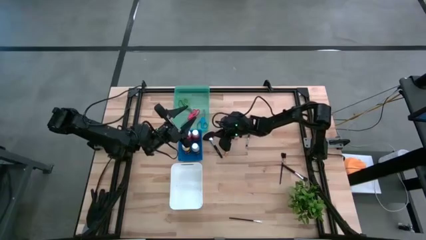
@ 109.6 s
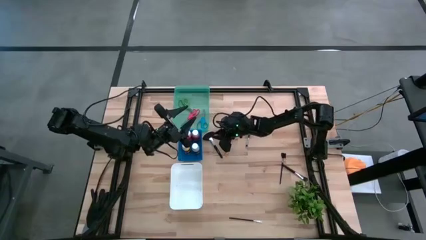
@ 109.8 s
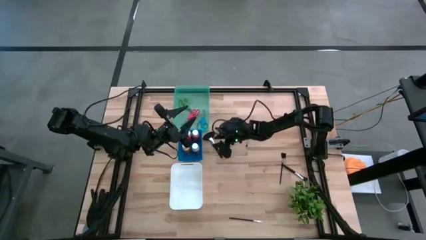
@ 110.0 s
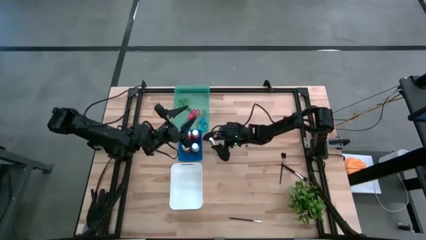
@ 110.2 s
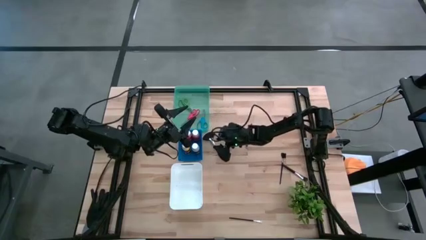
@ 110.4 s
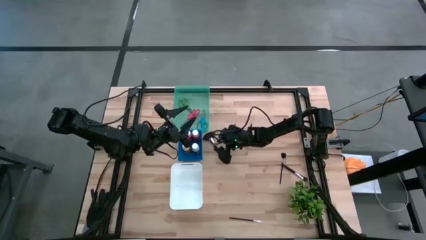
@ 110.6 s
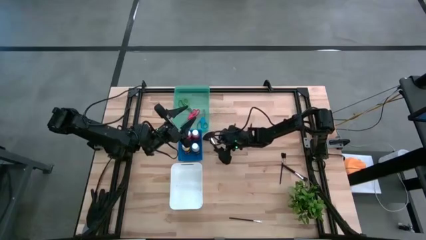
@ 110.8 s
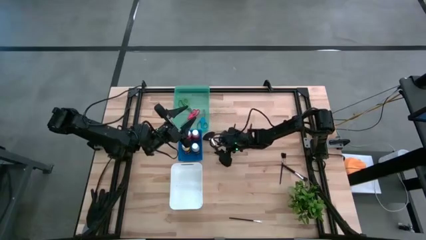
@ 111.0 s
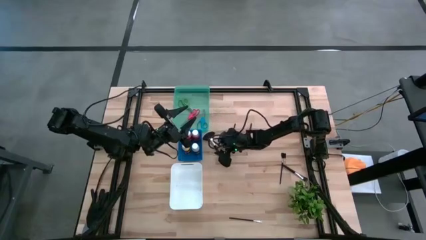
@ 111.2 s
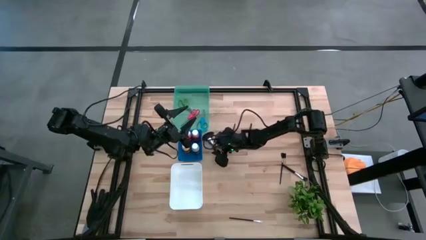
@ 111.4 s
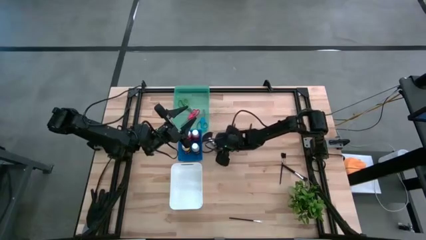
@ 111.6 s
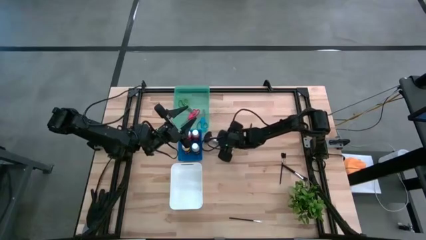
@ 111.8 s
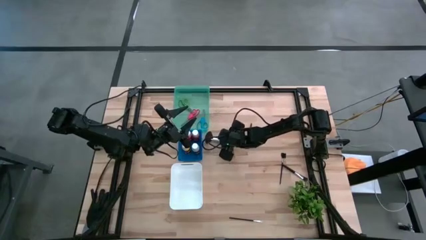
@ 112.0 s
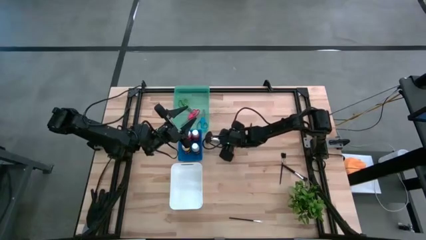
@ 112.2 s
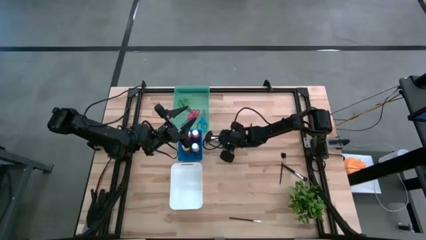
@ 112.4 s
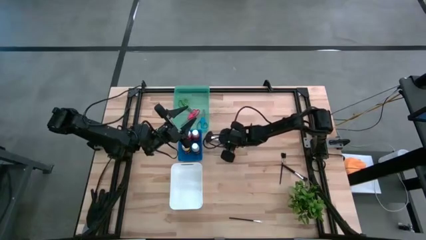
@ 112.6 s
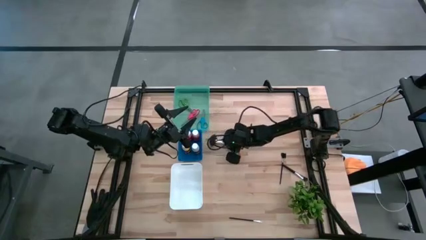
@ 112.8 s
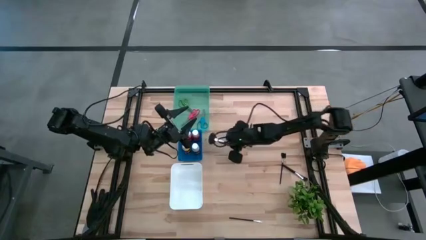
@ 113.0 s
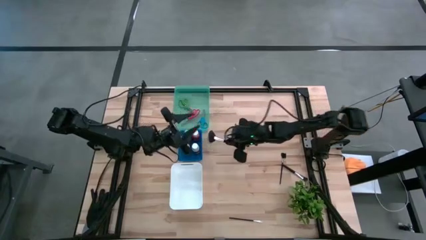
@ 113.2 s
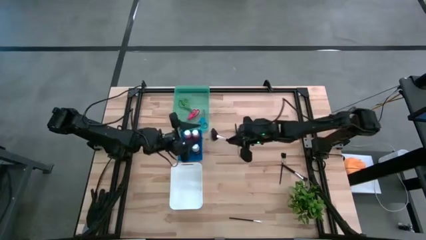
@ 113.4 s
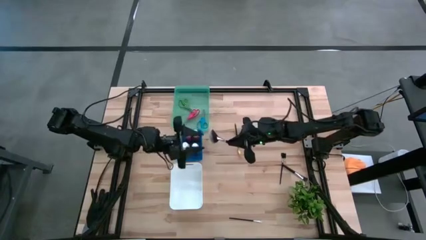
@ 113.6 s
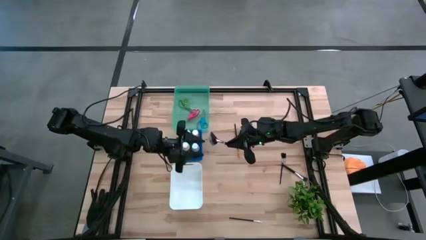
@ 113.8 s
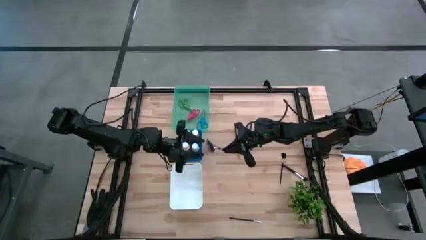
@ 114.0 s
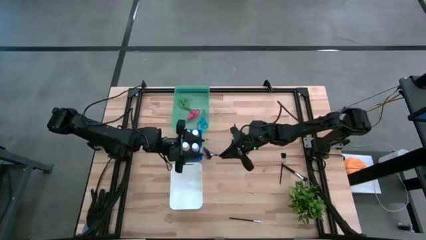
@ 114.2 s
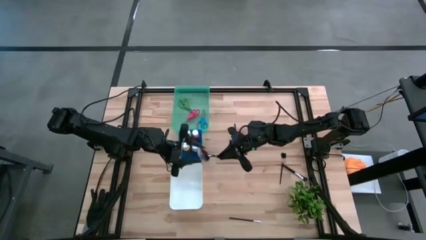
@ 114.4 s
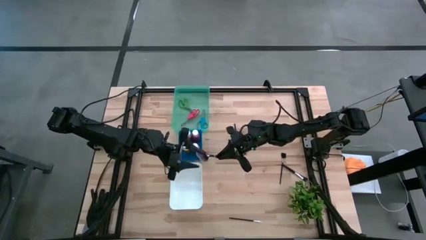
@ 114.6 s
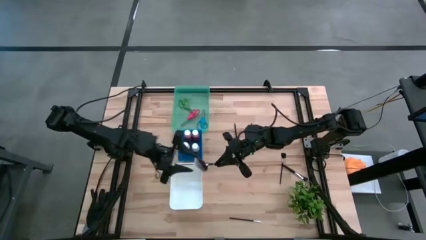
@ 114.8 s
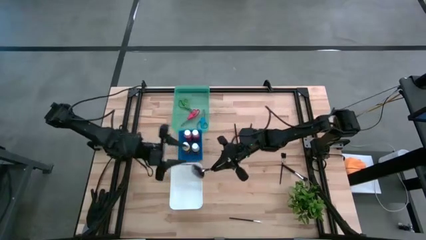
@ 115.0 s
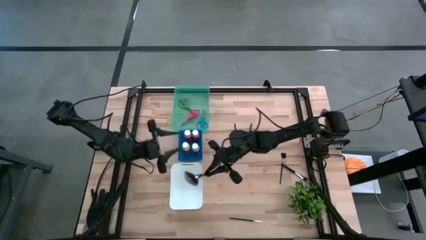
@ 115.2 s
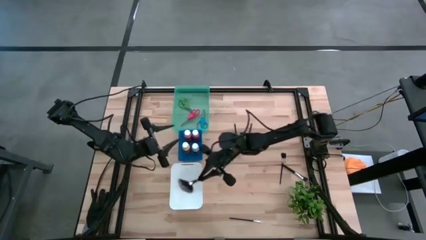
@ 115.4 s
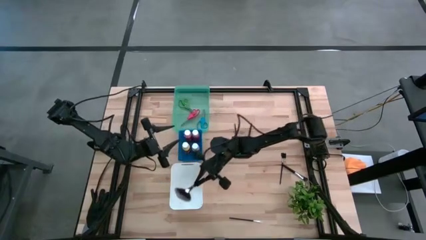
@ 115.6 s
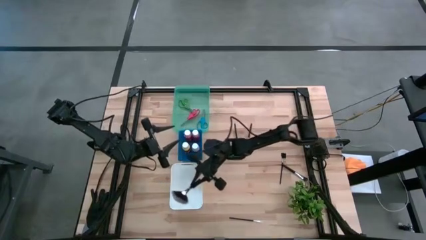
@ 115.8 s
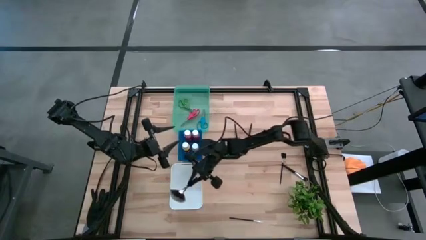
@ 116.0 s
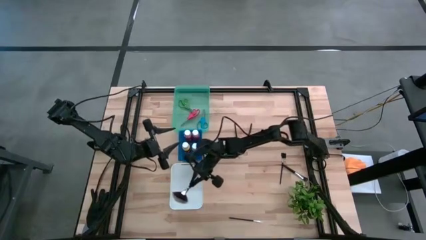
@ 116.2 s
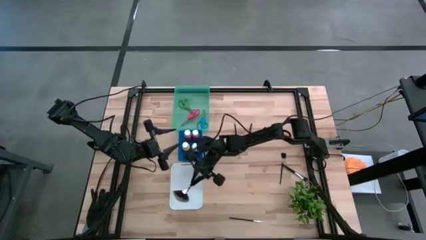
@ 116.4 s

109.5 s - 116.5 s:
Task: Pick & Place Paint Supplies
Put the black highlighter brush into the white bin

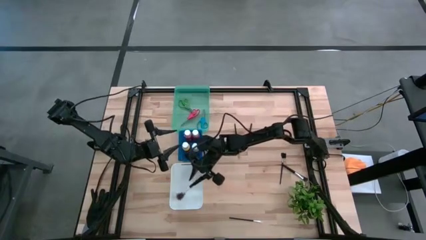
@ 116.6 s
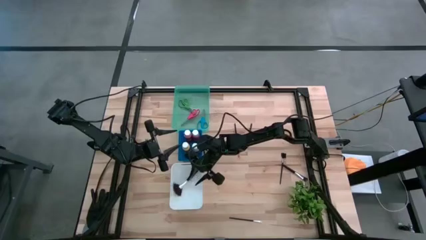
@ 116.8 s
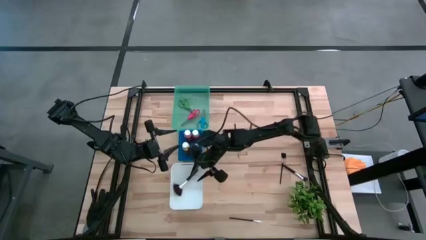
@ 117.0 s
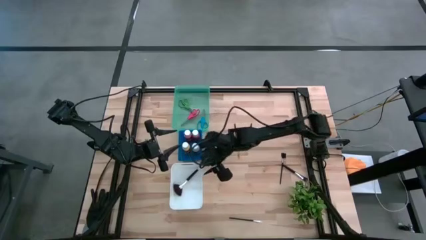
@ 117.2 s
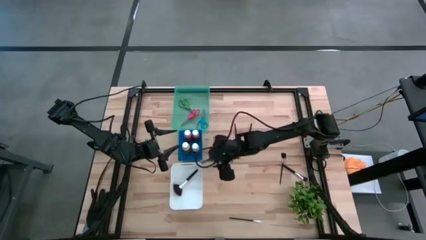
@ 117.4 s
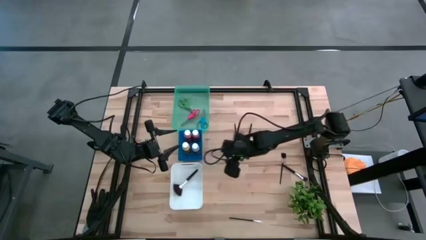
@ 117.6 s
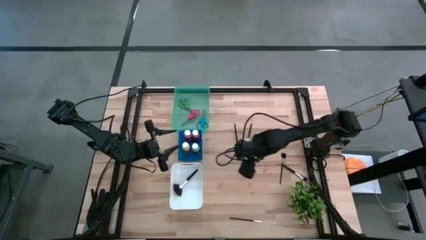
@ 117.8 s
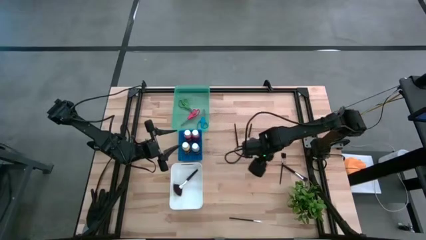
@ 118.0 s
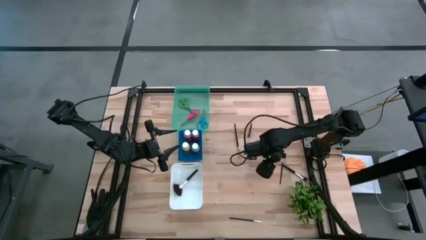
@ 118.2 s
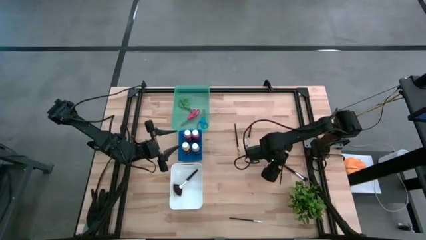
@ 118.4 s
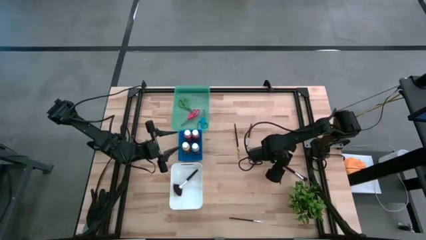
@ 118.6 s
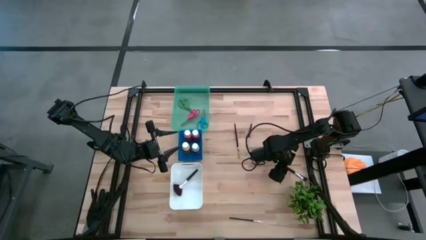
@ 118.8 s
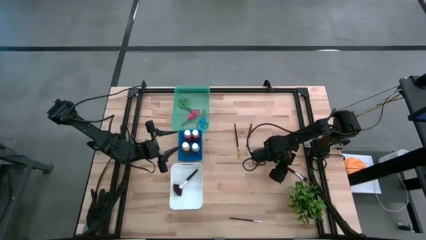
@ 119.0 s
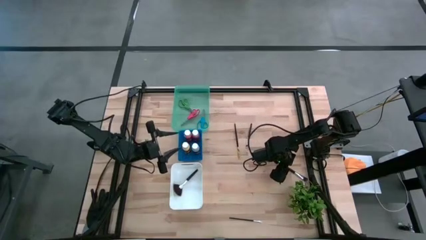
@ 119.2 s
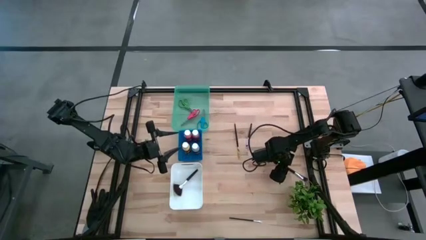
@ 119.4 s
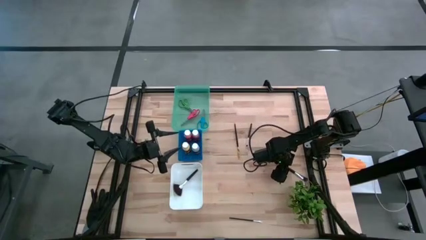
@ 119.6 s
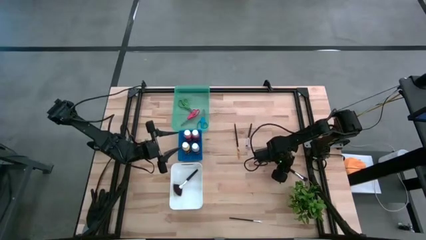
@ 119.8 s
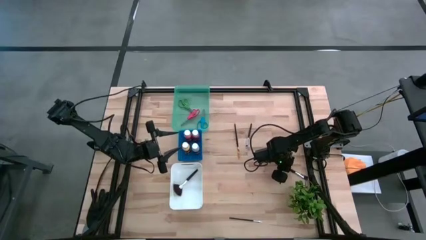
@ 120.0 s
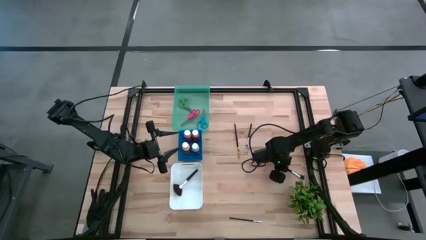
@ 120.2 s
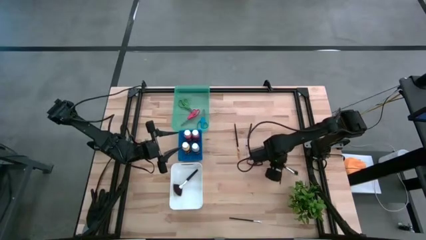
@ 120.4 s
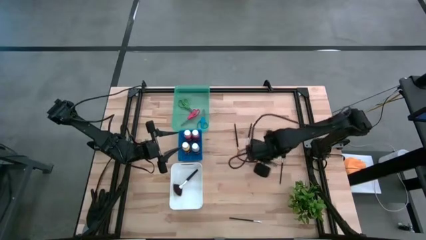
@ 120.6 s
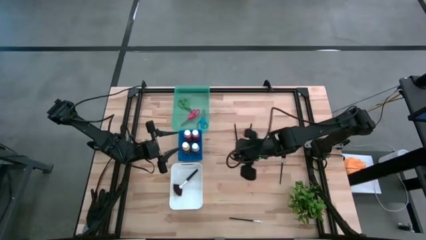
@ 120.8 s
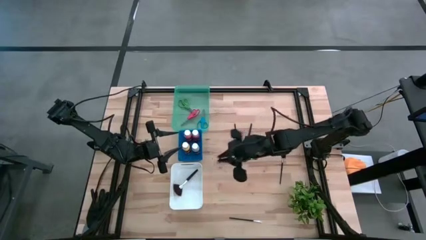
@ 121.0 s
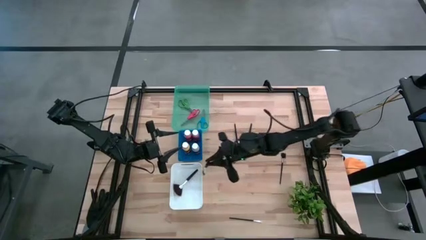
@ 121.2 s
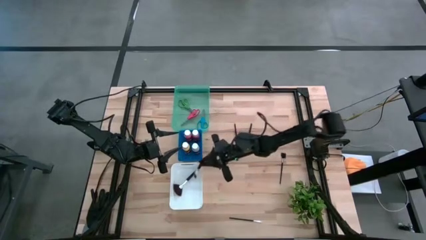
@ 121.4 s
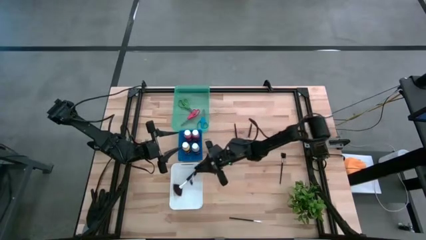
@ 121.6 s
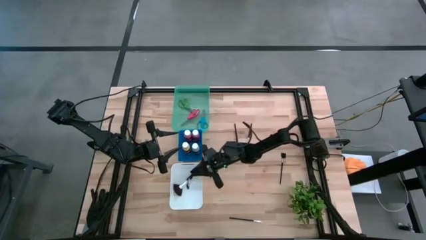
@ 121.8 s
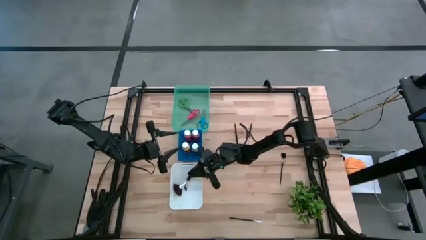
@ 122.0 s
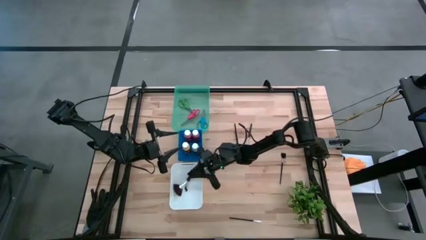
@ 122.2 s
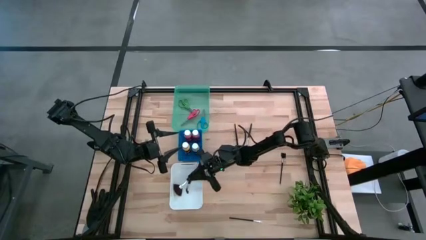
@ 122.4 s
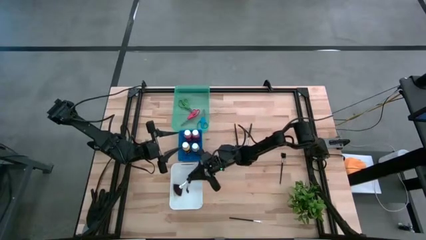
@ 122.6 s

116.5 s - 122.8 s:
Put the black foundation brush into the white bin
